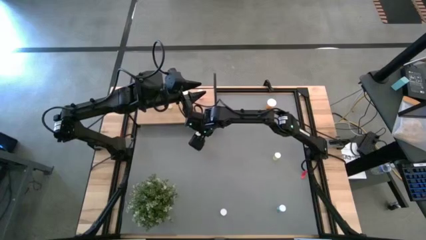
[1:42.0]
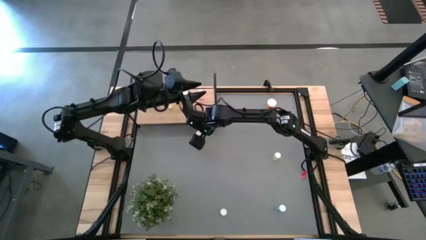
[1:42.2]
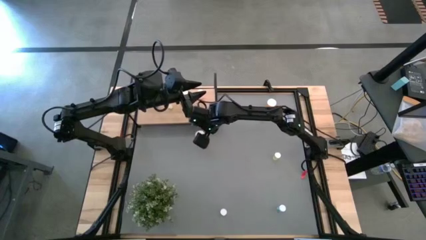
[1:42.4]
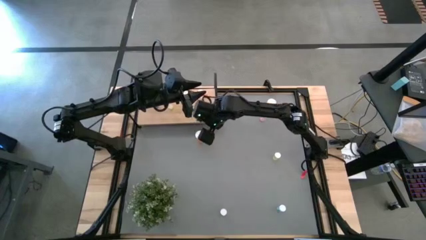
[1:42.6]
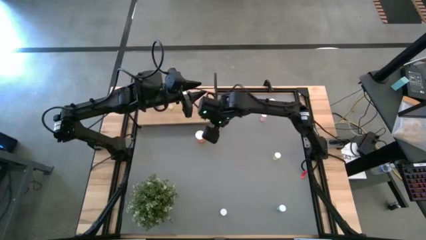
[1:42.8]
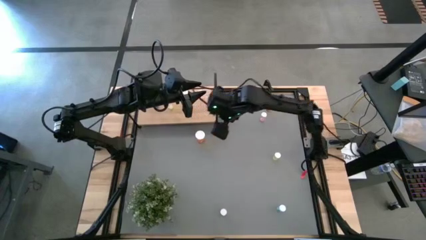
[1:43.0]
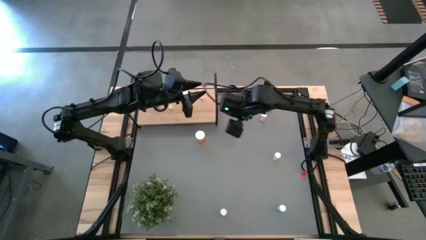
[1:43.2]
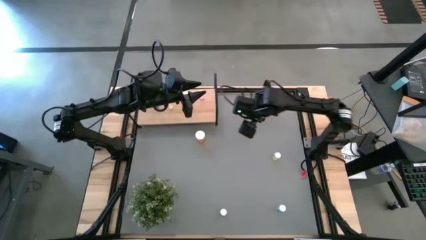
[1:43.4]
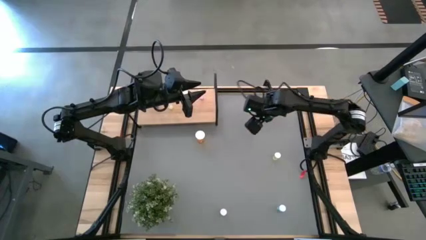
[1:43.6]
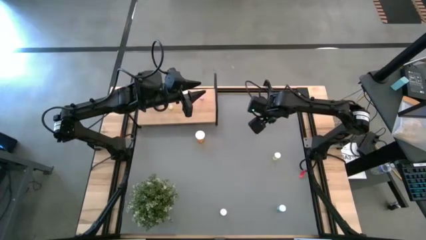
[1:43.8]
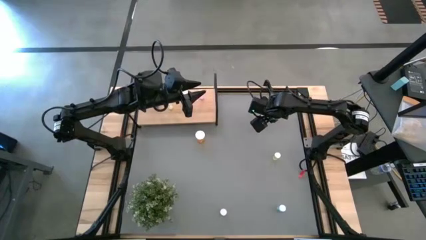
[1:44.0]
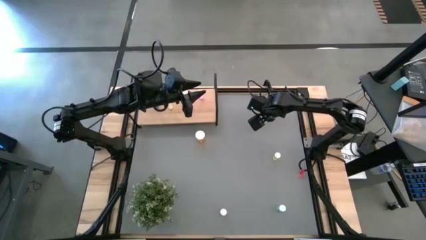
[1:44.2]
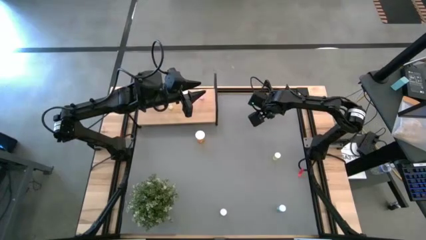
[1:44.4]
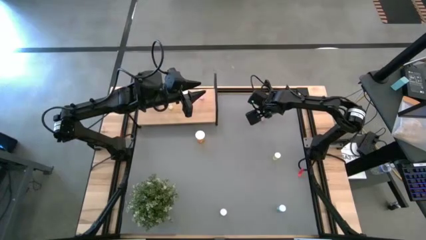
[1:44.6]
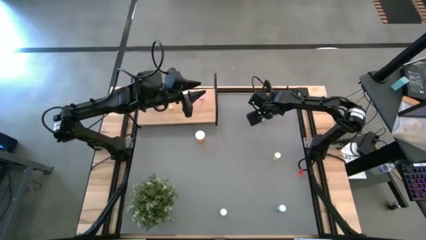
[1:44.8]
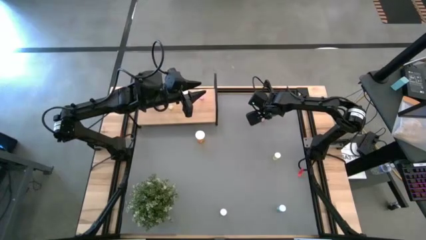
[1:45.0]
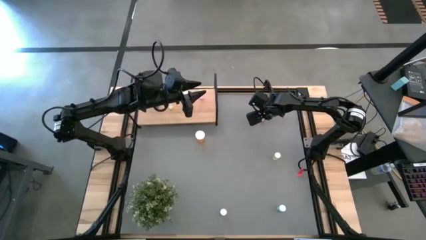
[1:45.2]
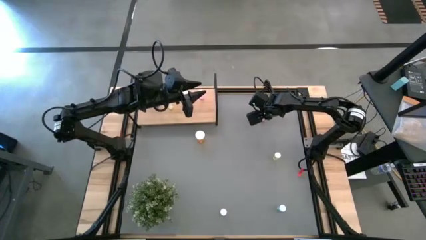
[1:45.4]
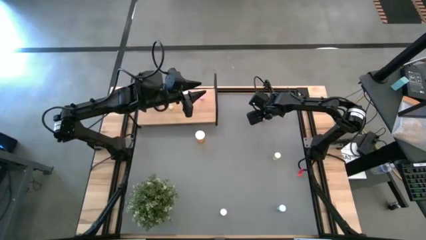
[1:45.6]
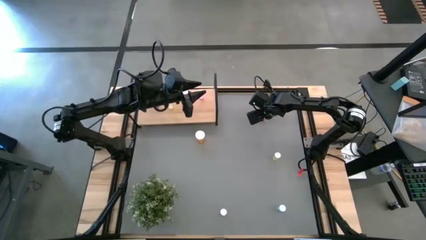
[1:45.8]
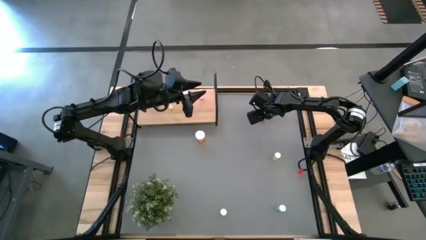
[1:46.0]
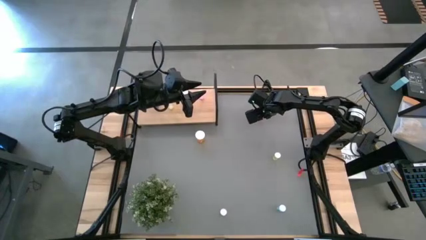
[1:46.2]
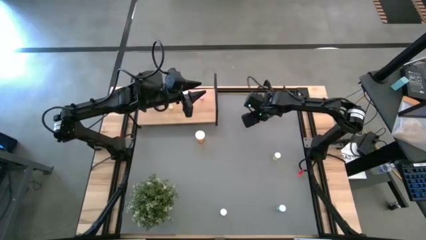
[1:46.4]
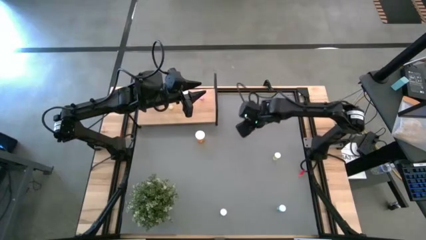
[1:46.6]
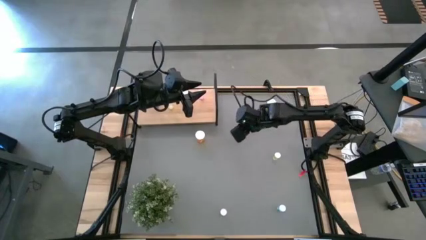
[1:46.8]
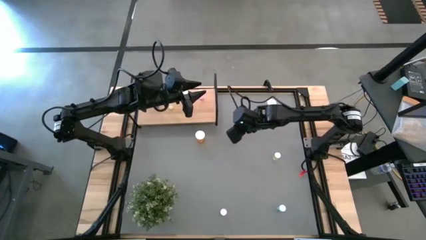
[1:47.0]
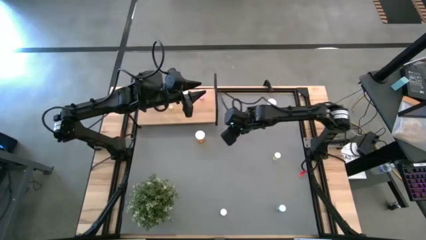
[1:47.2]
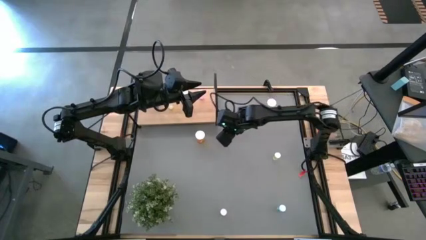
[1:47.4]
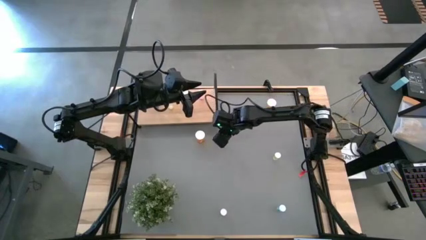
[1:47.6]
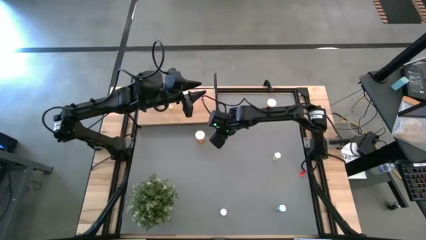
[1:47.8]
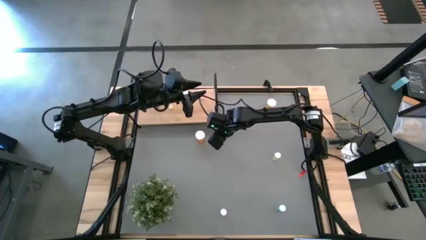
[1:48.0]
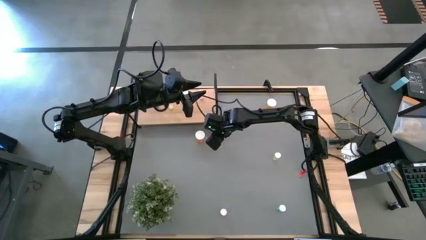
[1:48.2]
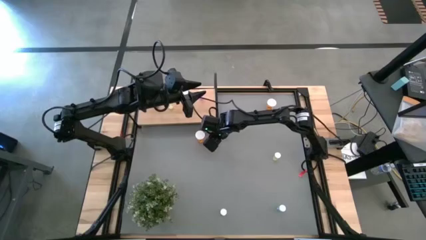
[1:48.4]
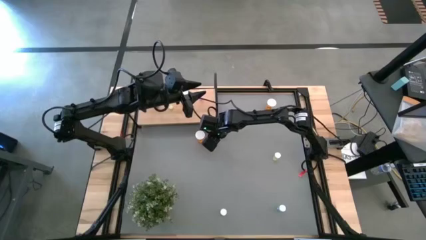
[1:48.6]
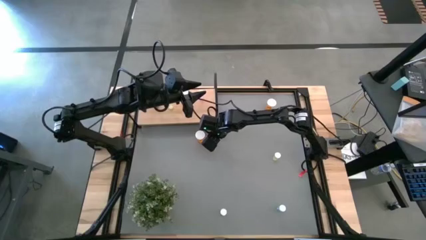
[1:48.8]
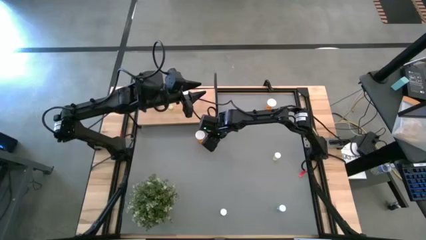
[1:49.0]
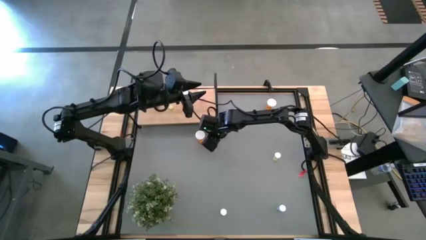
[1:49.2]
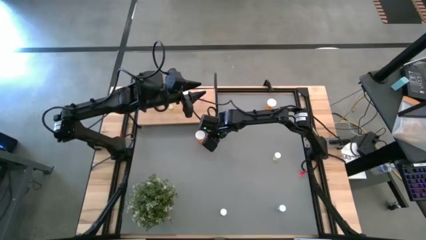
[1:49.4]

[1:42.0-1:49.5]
Task: Pick and place medicine bottles onto shelf by color
Move the top pink pill bottle to the middle of the table

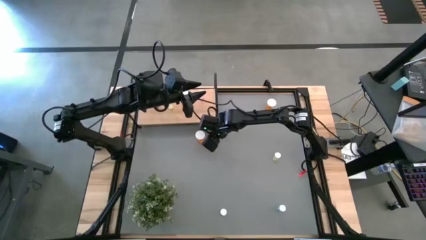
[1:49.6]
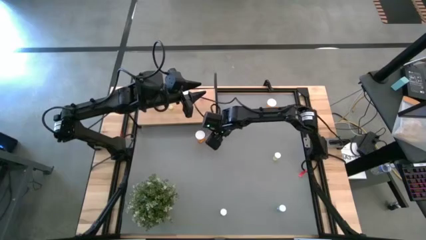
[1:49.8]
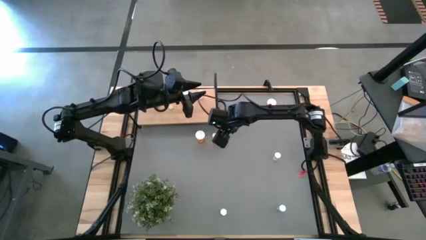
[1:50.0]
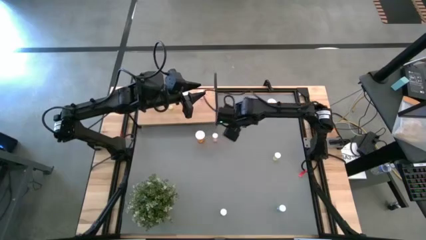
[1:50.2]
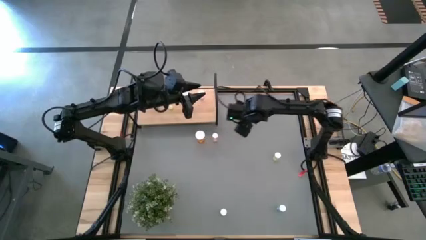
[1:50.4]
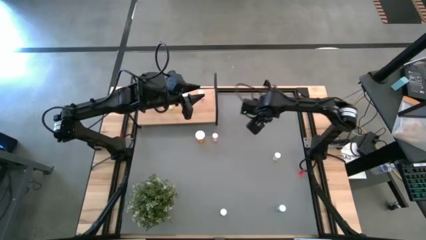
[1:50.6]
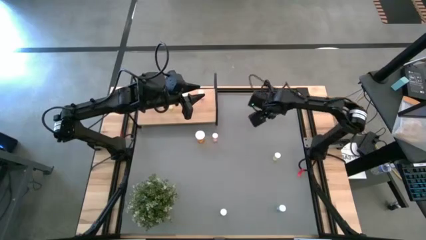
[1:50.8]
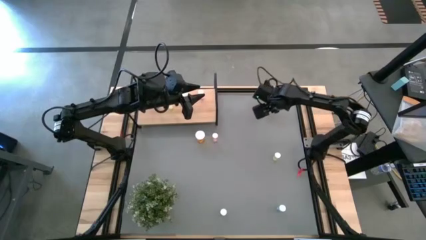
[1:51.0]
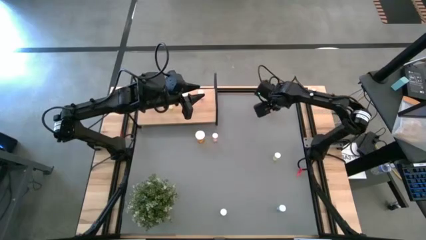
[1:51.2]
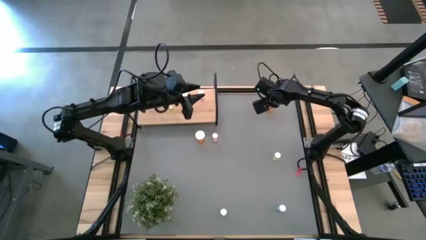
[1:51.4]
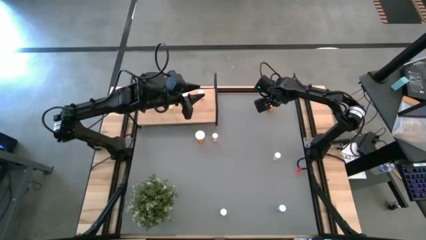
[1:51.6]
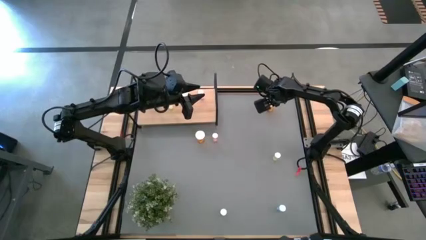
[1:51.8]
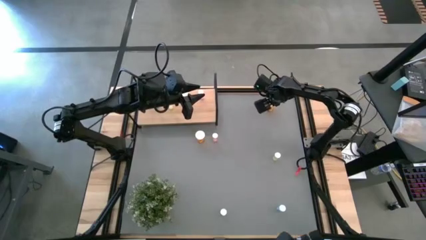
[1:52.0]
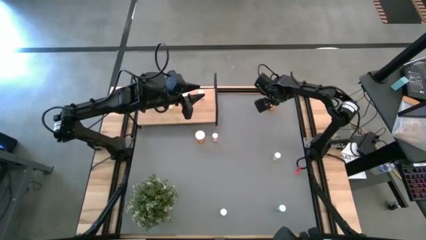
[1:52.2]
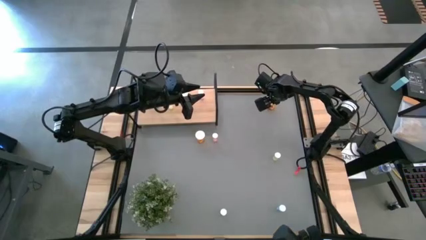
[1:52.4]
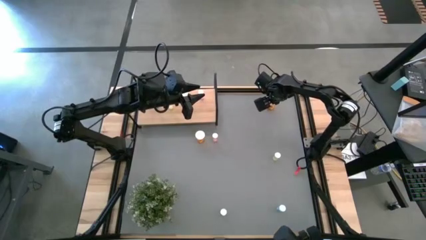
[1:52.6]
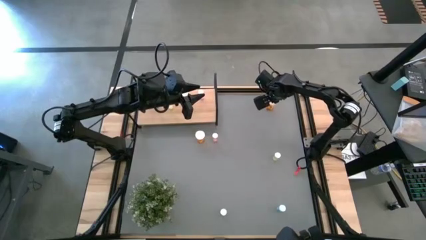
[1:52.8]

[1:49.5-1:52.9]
Move the top orange pill bottle to the middle of the table

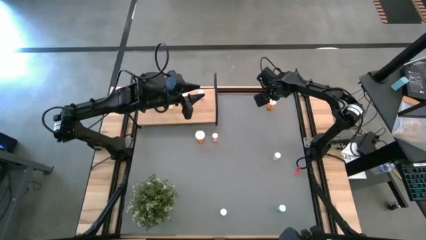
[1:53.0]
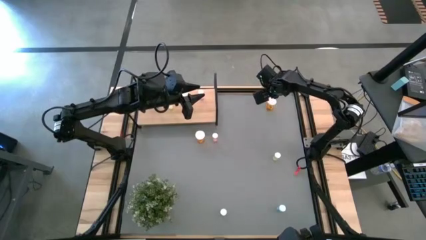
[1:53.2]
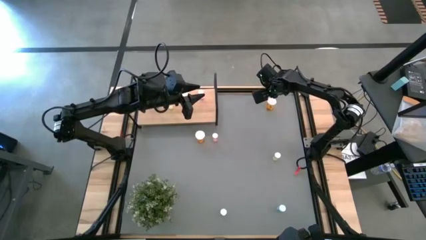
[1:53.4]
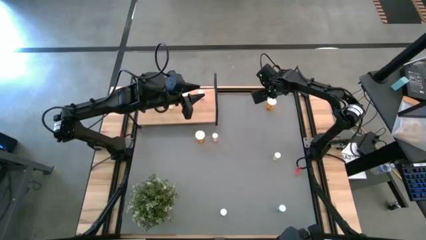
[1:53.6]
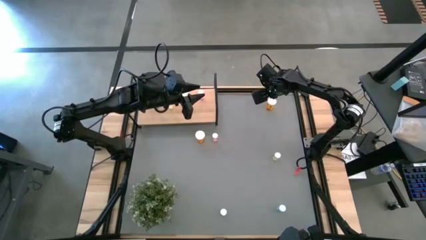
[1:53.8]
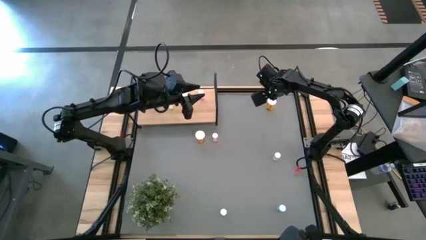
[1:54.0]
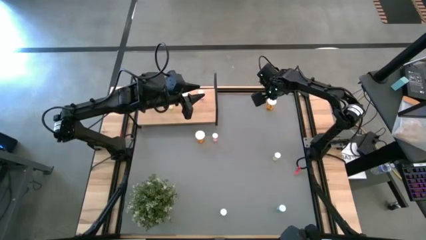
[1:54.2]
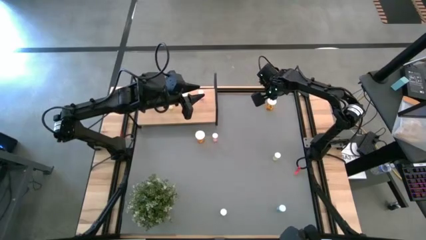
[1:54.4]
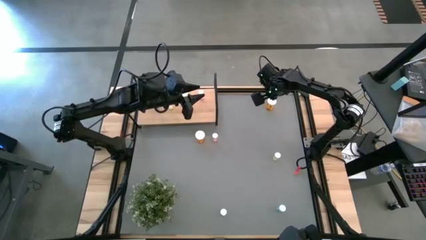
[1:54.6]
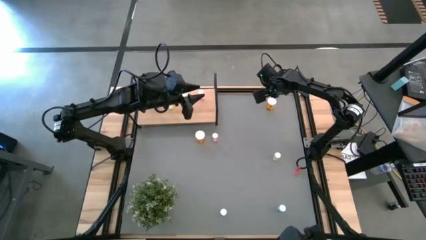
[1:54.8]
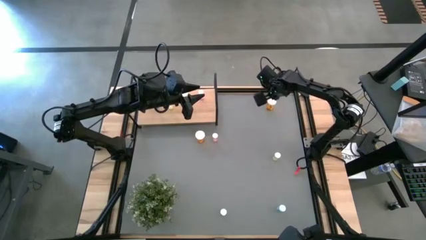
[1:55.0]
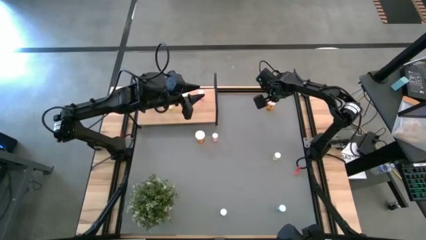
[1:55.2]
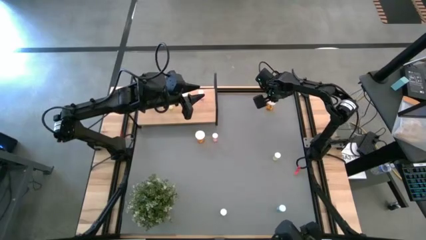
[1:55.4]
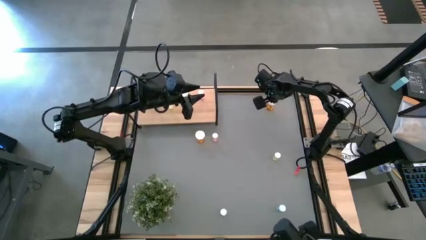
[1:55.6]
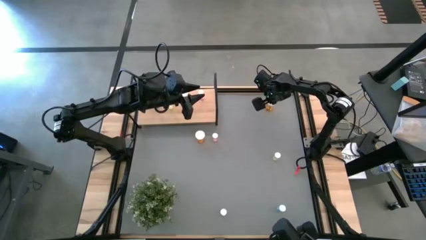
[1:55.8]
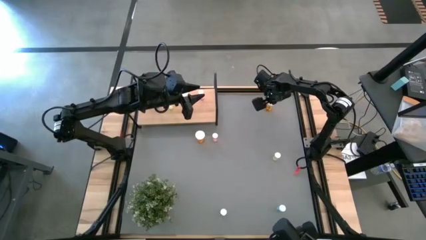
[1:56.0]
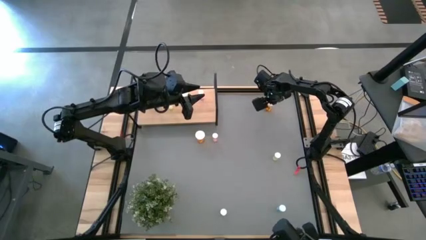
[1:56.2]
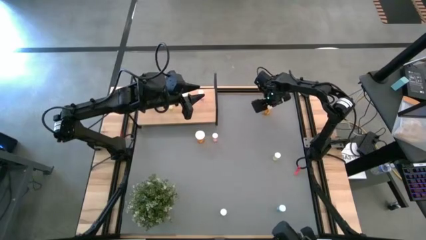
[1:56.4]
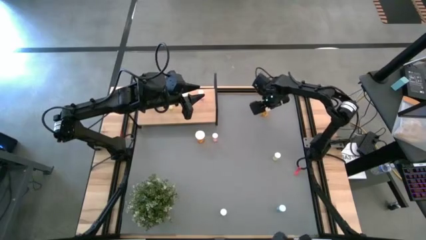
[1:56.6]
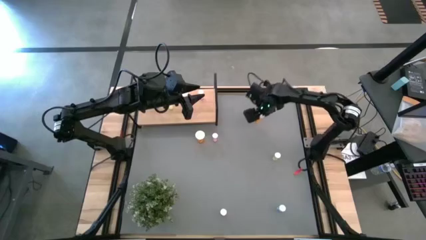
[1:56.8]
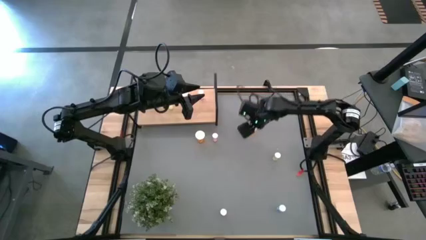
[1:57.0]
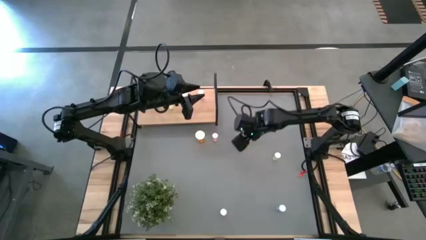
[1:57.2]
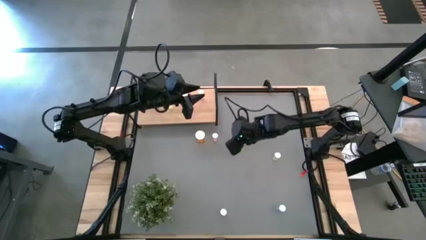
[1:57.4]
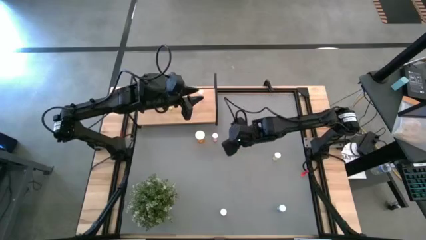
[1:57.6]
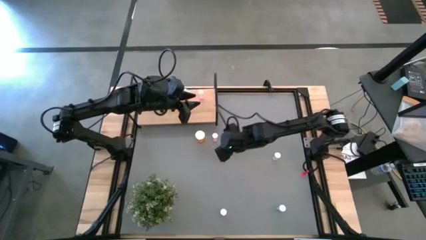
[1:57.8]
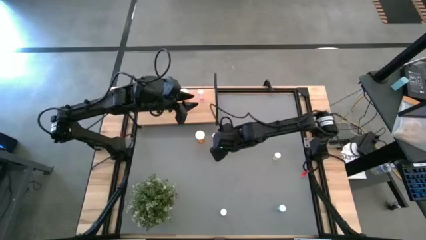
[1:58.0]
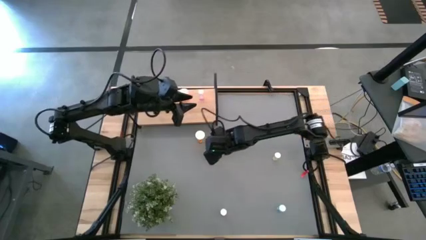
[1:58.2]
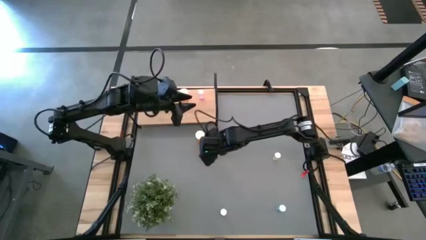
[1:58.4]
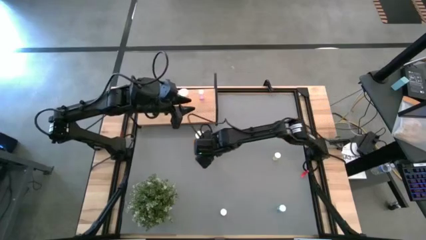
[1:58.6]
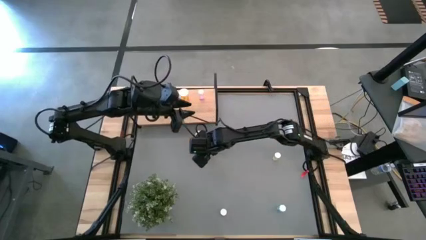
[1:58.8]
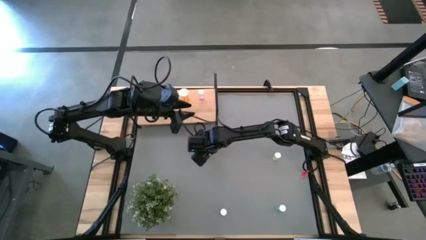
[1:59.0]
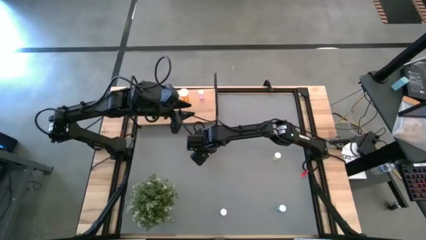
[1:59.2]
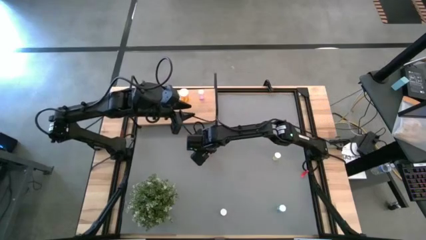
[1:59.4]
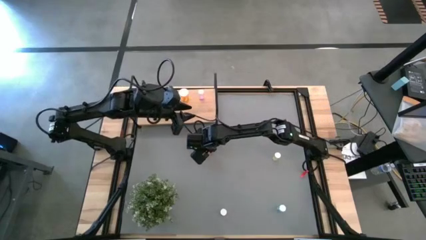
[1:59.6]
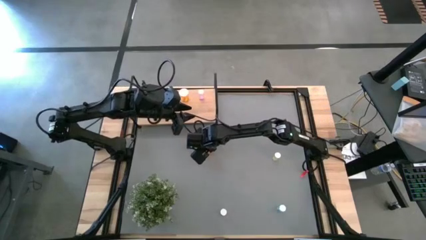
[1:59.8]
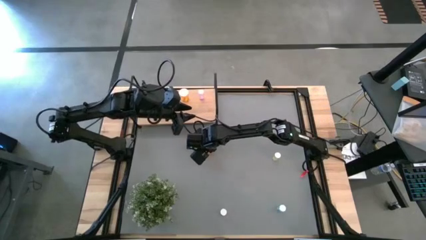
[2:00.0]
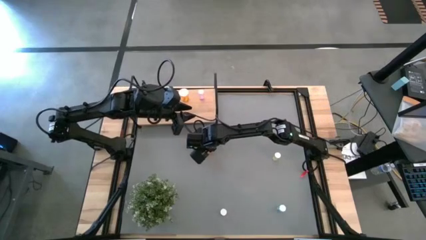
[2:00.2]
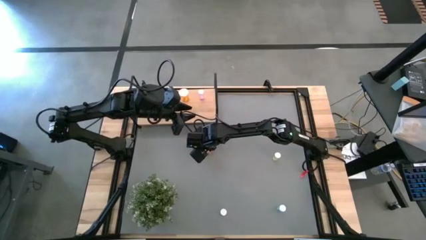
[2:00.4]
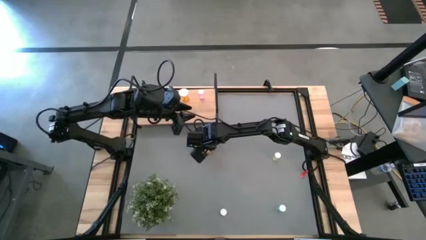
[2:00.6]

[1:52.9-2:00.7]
Move the top orange pill bottle to the middle of the table
